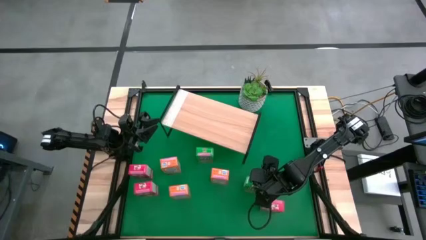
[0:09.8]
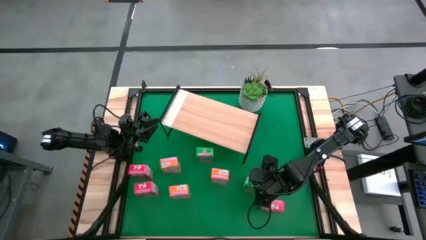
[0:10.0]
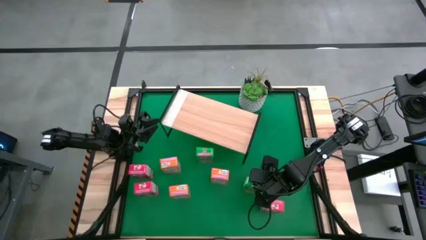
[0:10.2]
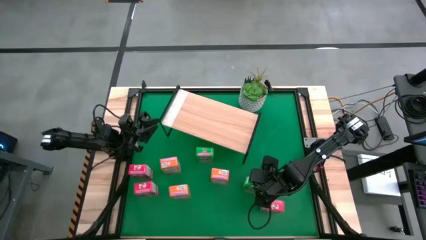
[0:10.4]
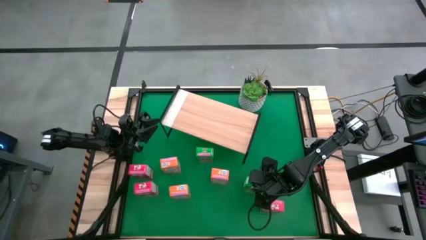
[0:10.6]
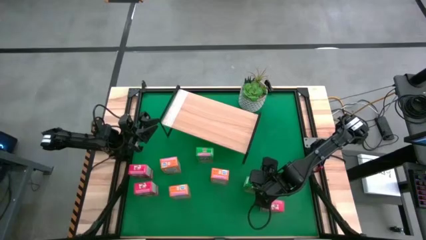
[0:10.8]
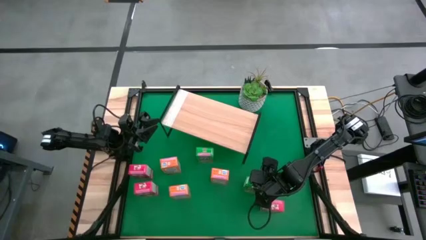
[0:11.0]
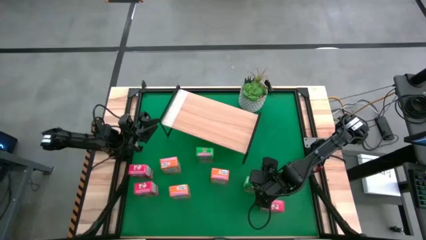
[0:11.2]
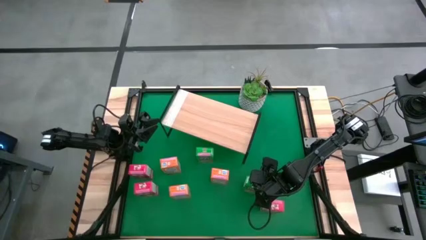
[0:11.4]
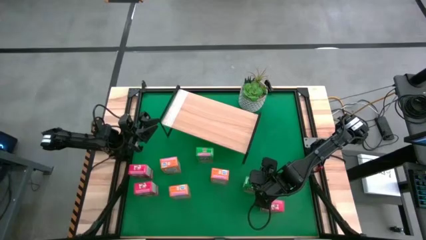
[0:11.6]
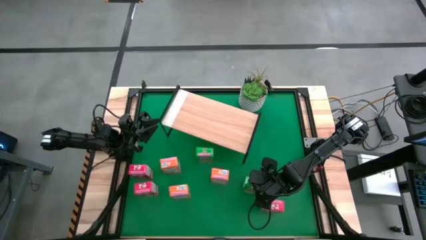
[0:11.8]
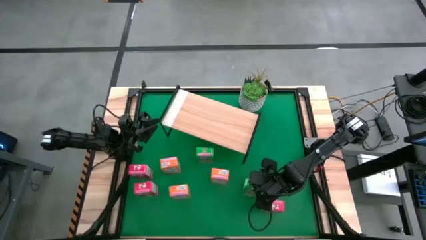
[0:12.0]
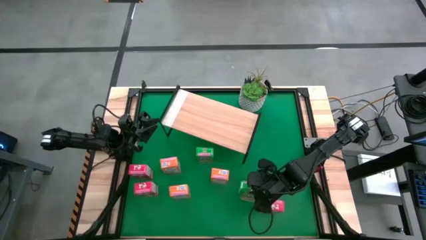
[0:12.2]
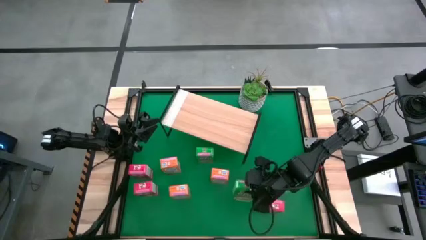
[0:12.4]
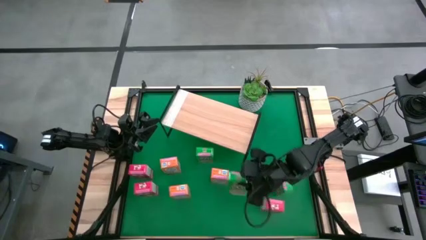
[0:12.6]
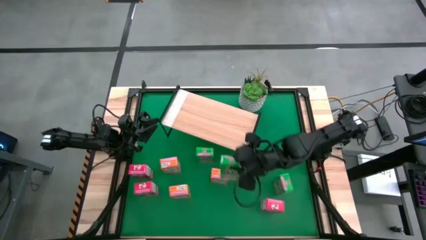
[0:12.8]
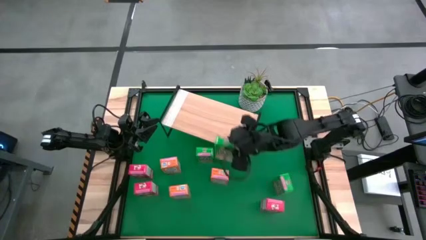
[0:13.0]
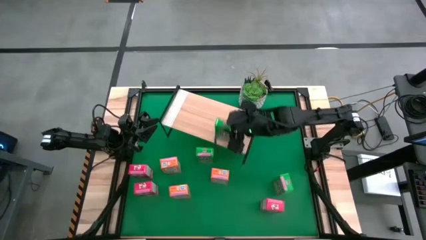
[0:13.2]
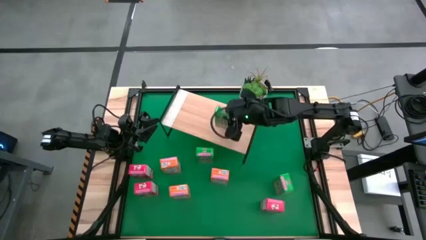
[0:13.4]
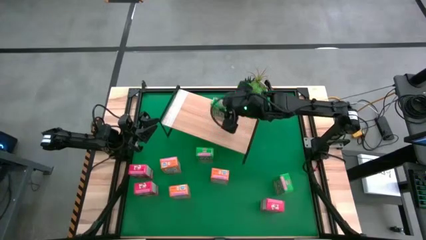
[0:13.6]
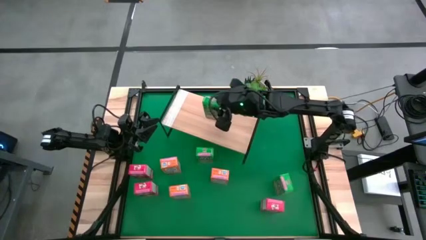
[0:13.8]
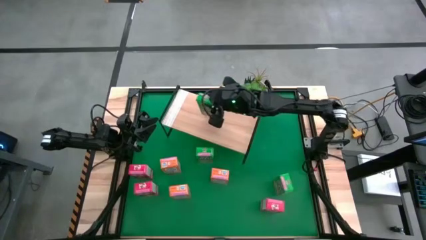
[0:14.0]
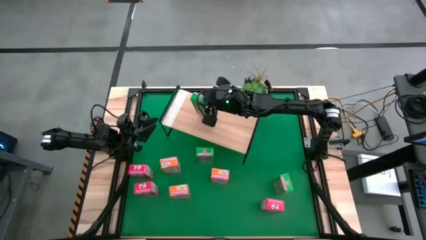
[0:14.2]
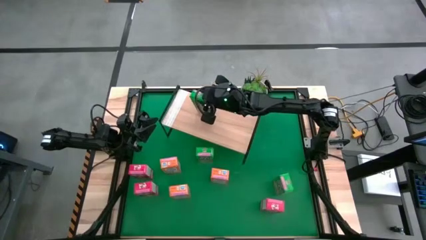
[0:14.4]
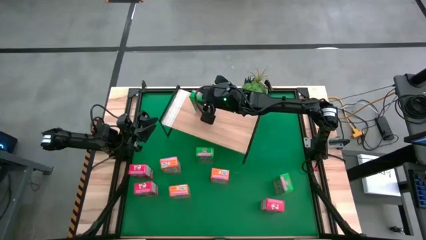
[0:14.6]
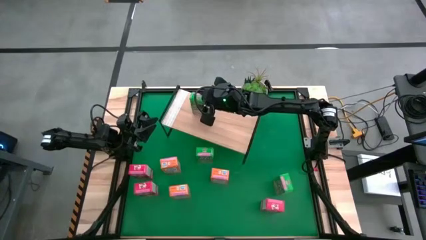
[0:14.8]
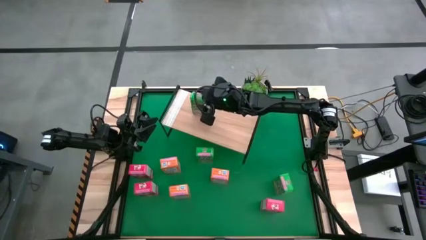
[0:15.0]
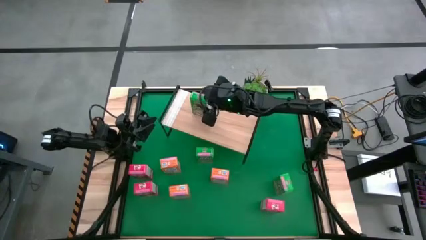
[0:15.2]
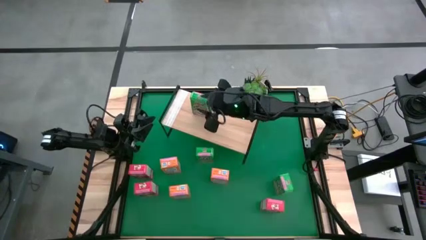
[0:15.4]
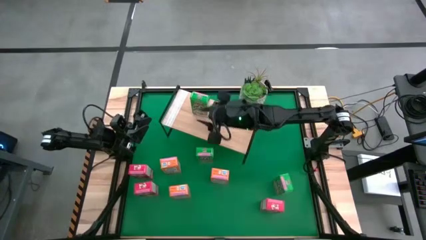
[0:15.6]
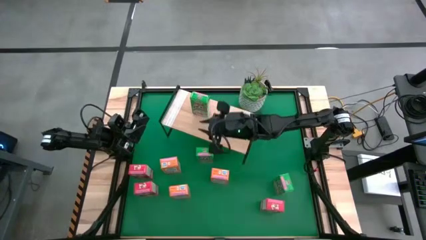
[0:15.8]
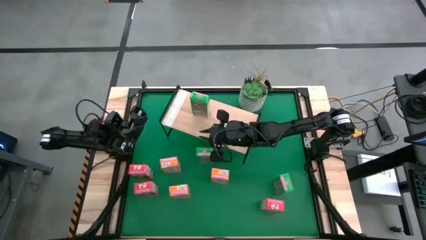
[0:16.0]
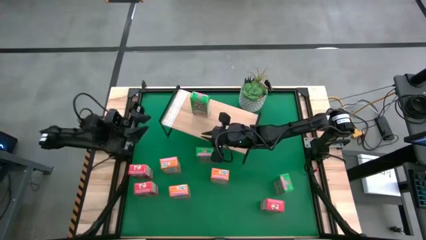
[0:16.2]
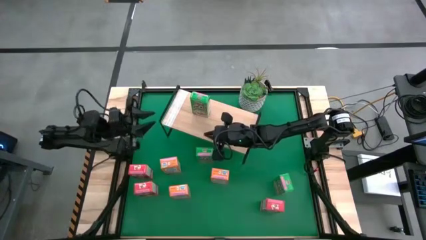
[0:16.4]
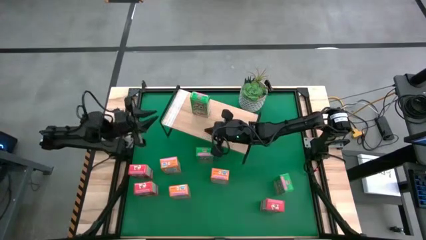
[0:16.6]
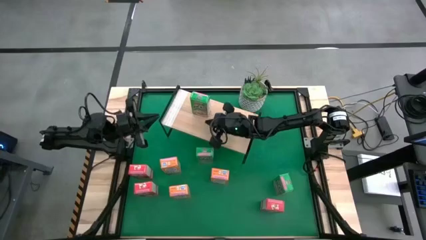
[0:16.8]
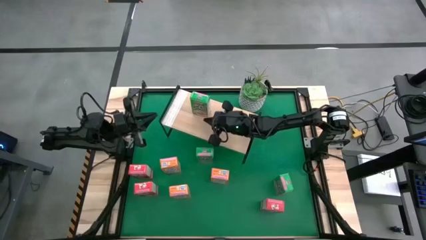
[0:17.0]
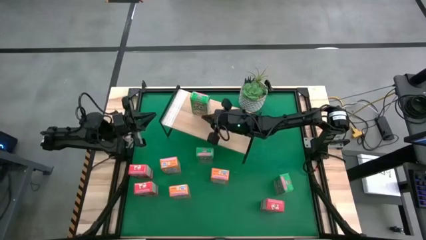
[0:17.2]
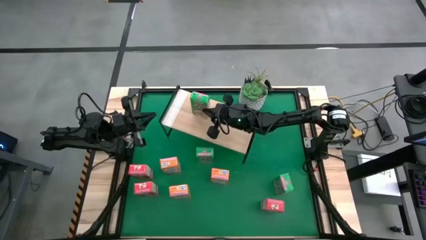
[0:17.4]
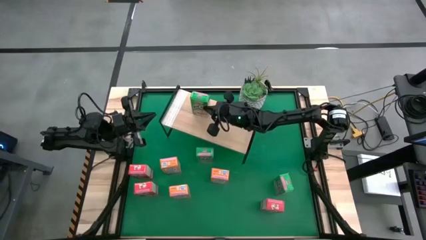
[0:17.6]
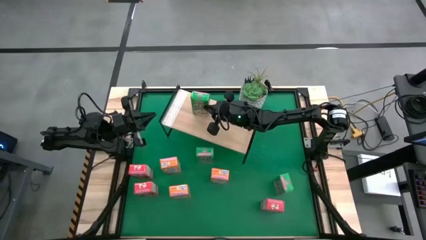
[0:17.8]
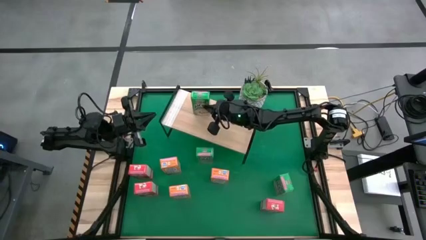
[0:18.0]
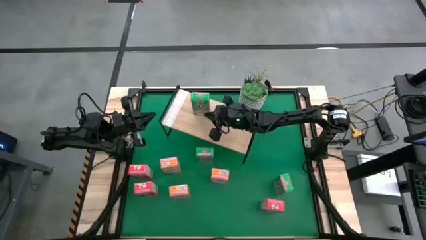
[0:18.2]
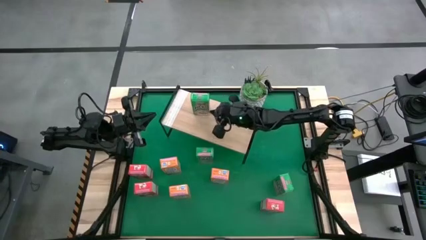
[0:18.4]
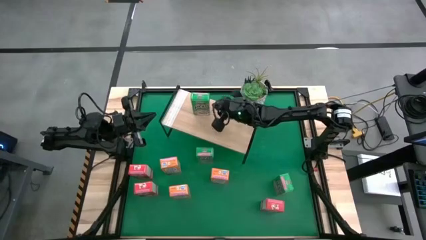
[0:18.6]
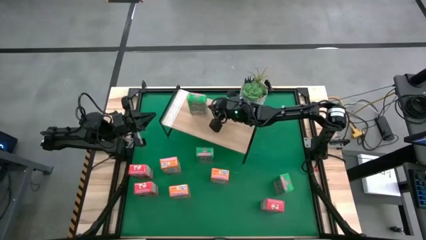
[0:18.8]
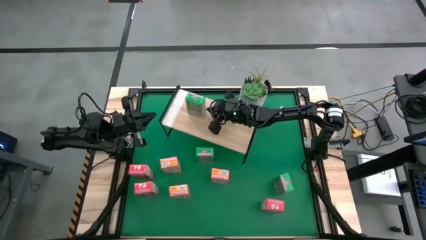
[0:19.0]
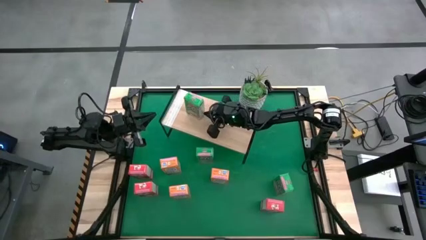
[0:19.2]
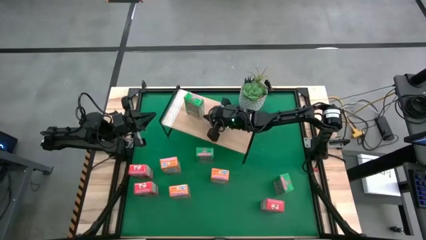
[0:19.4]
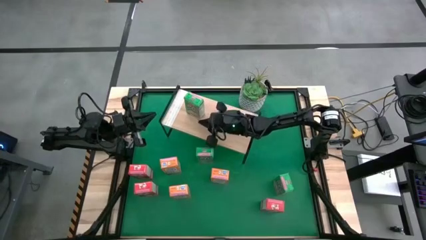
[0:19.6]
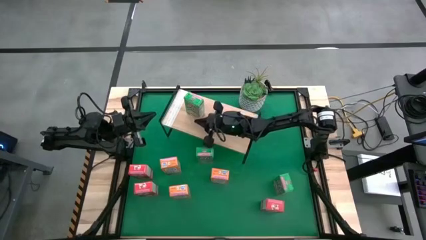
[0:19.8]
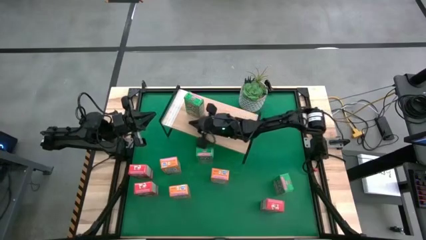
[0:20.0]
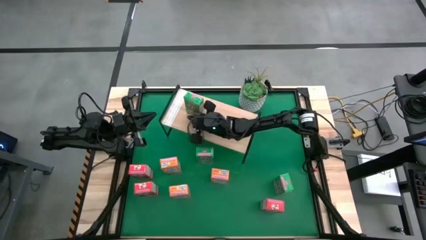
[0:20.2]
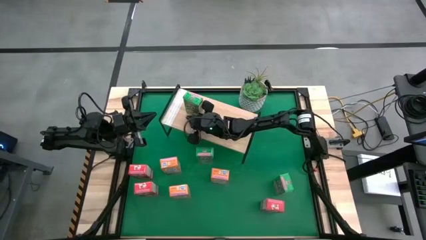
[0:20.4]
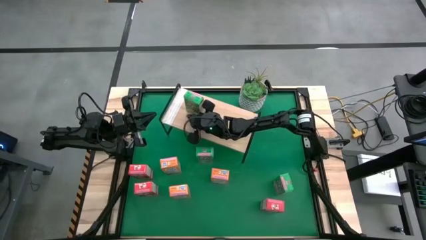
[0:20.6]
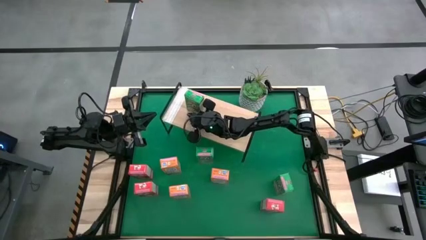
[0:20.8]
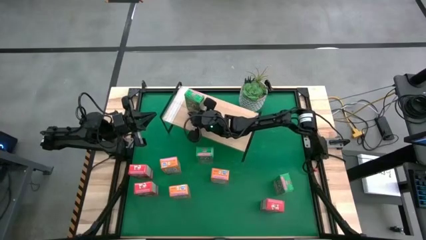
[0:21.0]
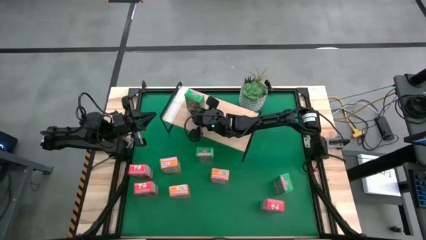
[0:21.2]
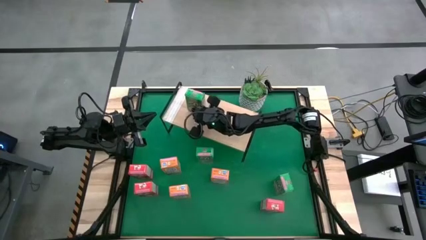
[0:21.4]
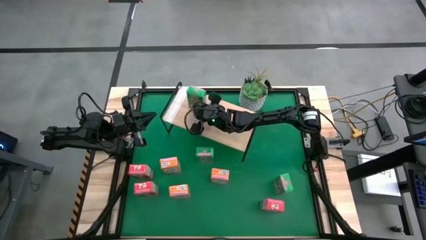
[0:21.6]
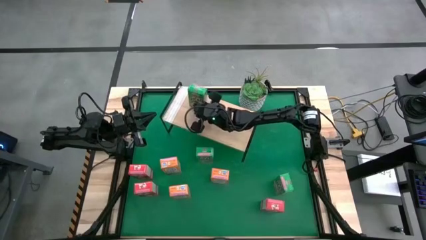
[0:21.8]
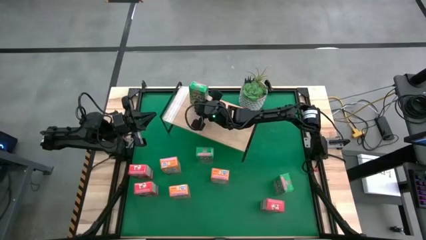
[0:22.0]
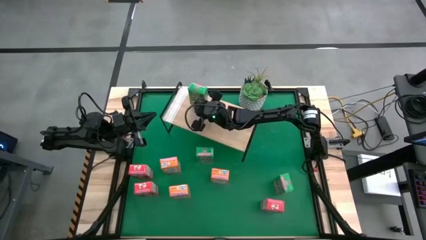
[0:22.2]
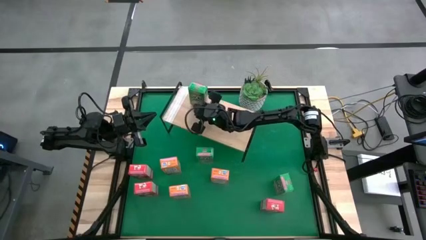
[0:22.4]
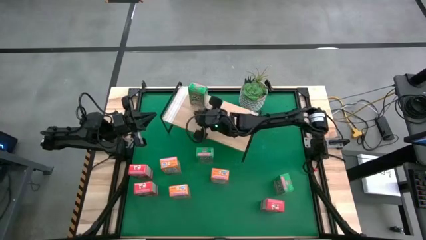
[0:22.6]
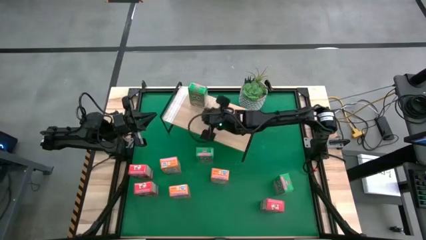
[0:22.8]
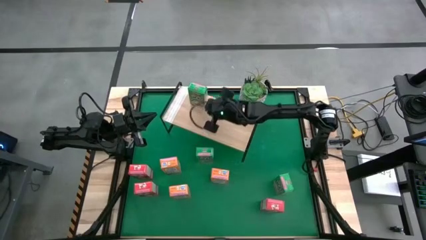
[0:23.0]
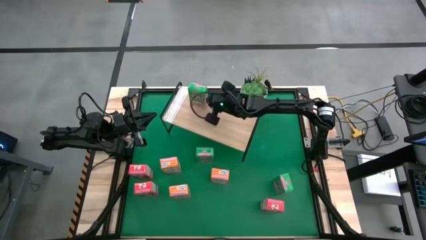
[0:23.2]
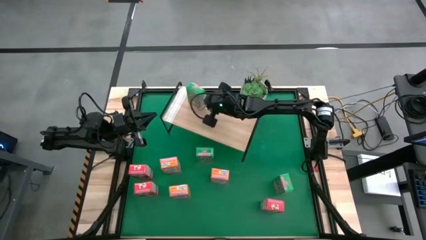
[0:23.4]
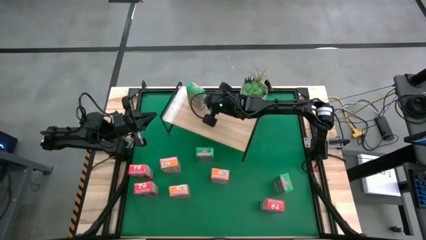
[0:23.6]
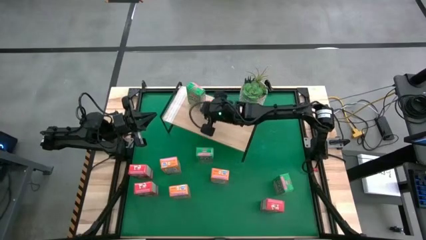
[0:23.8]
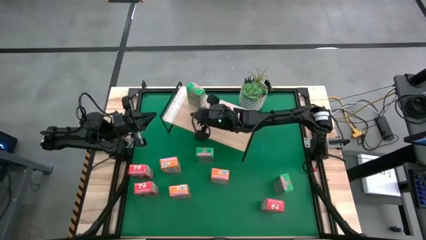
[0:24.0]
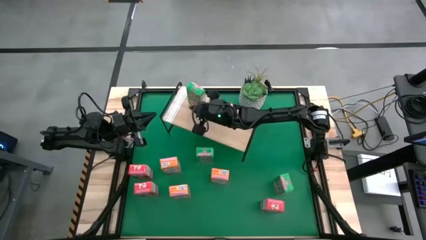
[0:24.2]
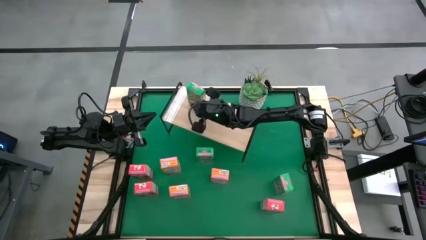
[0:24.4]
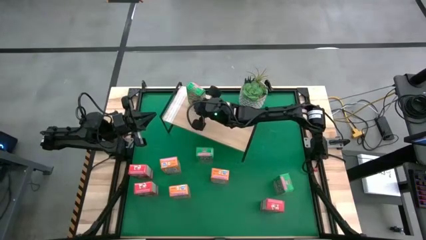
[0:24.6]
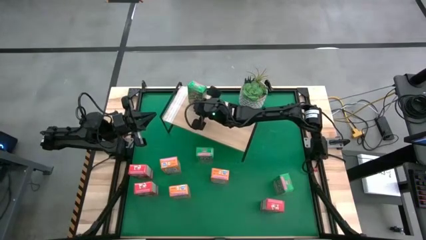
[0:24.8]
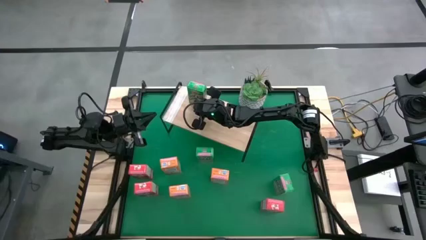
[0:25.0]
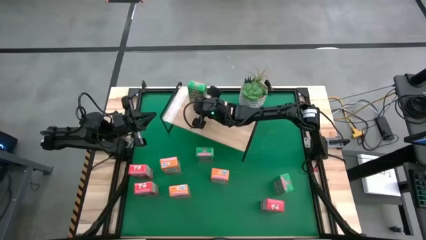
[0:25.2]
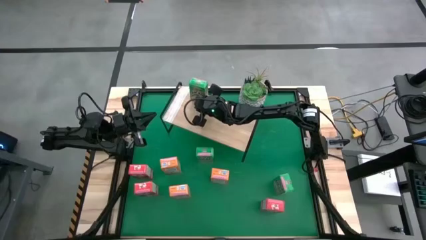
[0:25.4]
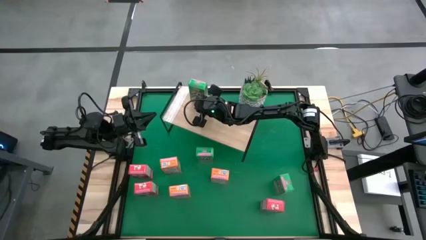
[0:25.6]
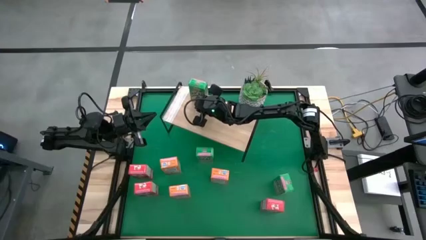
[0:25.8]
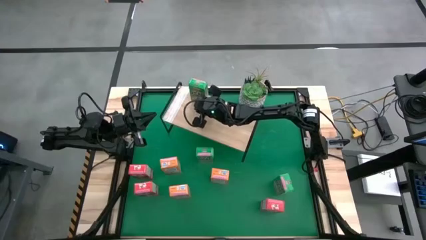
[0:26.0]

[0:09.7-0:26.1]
Task: Stack cereal on shelf
Put the middle green cereal box on the shelf
